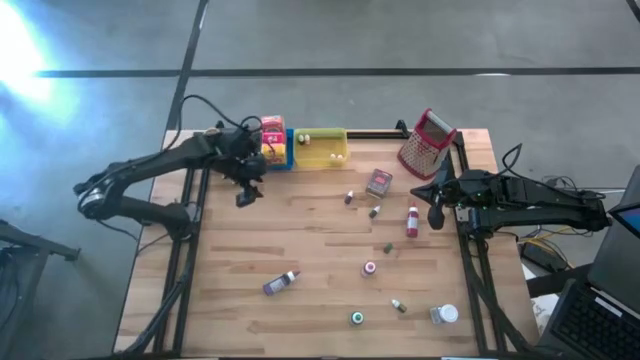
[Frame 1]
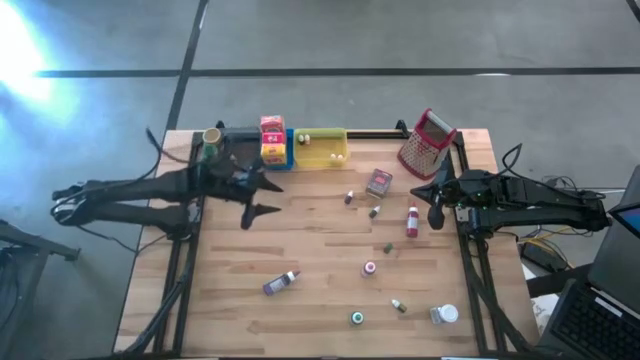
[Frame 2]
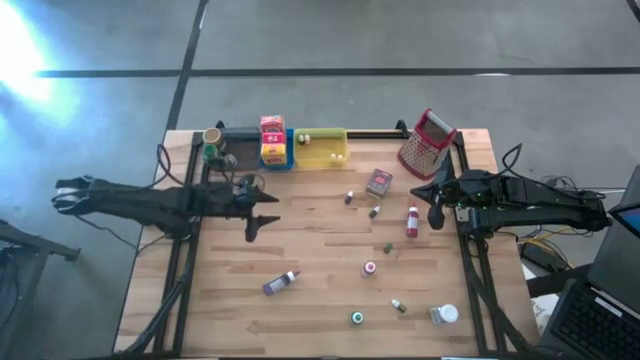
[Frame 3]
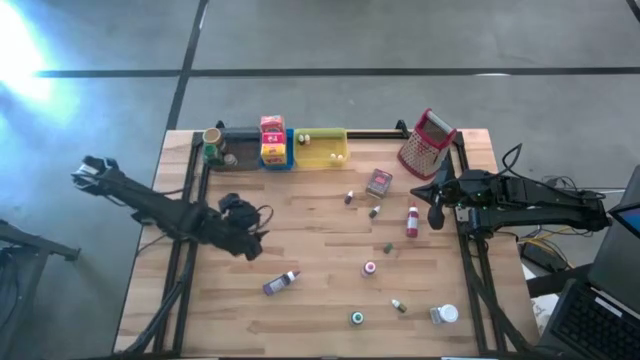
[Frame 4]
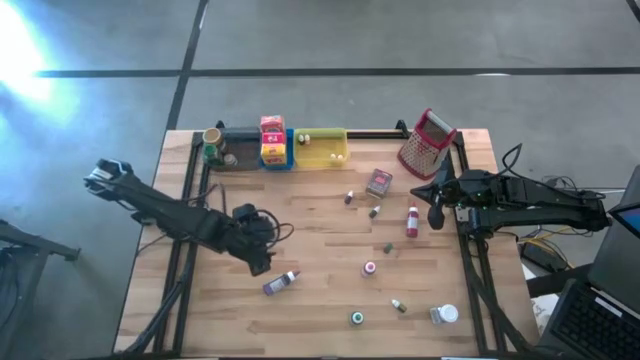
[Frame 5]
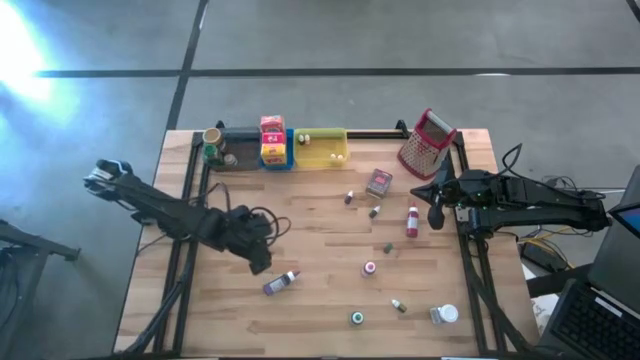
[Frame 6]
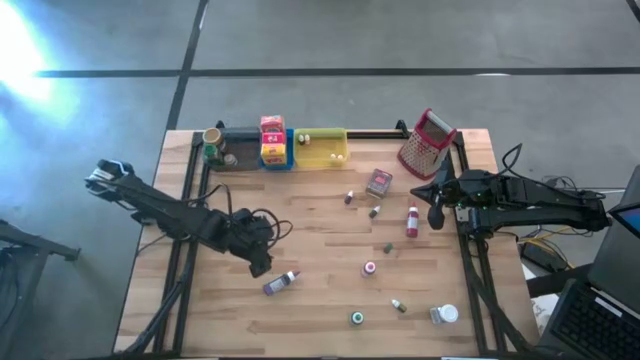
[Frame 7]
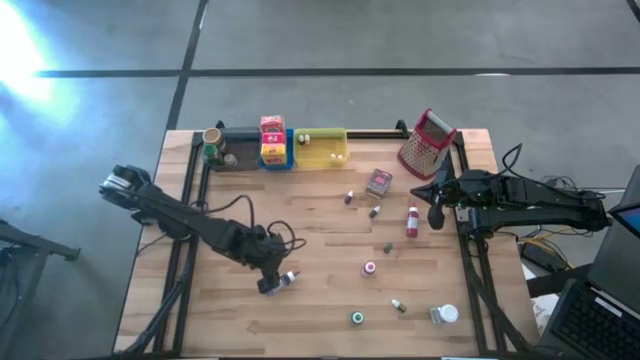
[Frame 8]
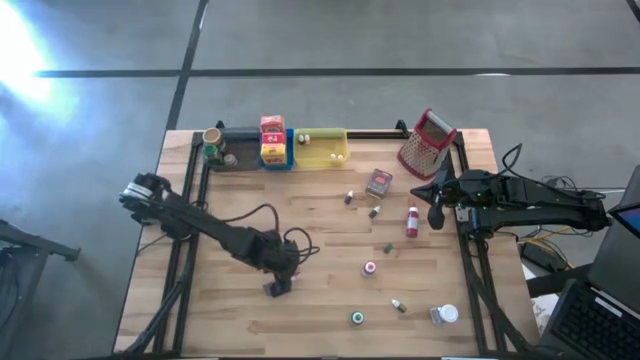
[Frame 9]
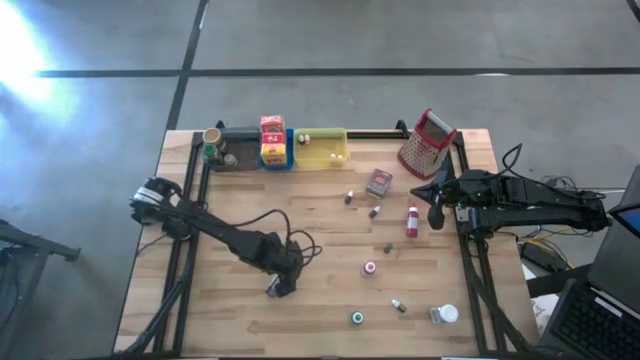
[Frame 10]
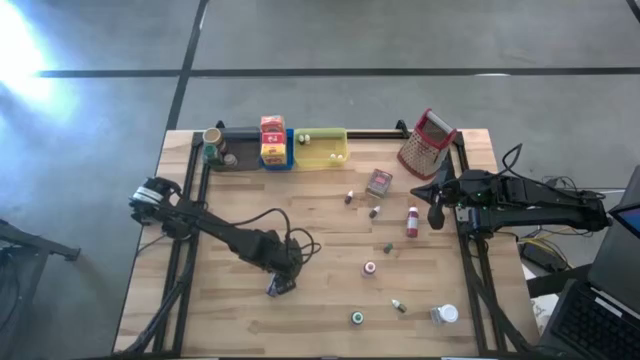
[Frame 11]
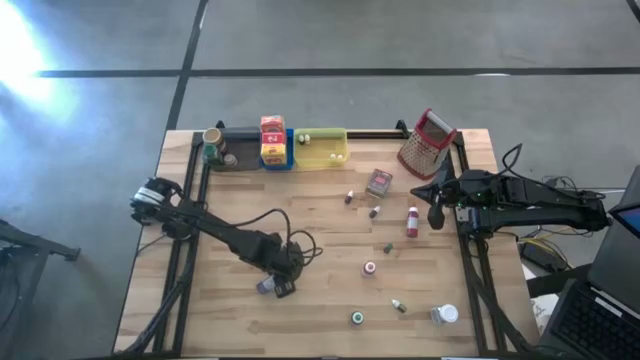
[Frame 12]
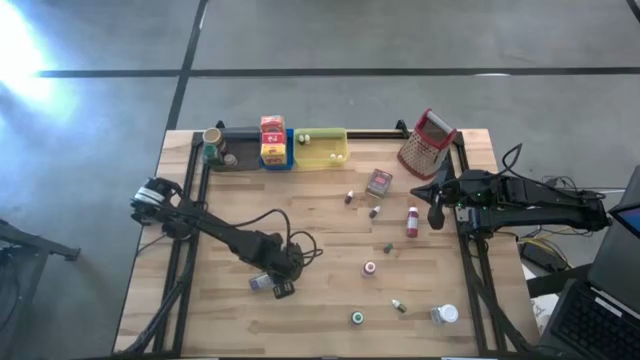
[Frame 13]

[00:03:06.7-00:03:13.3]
Task: Pick & Place Kitchen Items
Adjust the large violet food coloring bottle

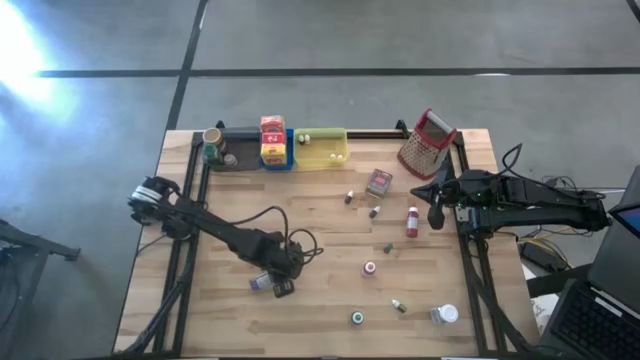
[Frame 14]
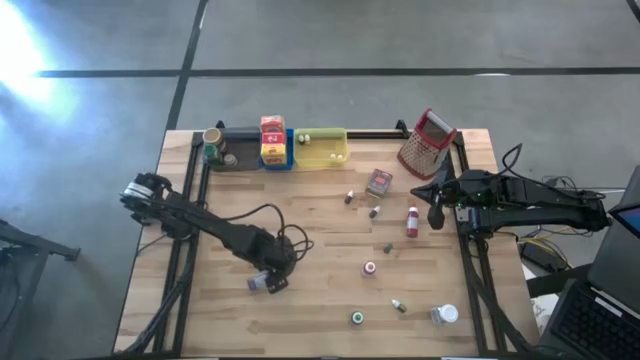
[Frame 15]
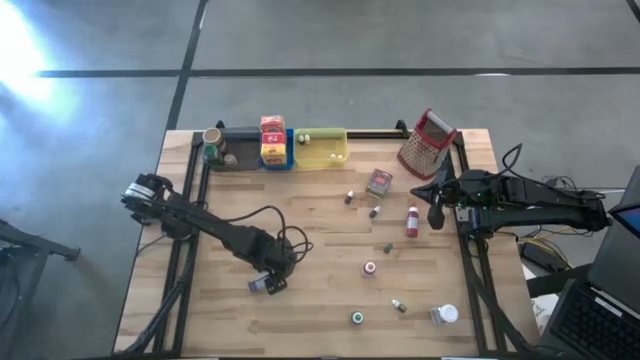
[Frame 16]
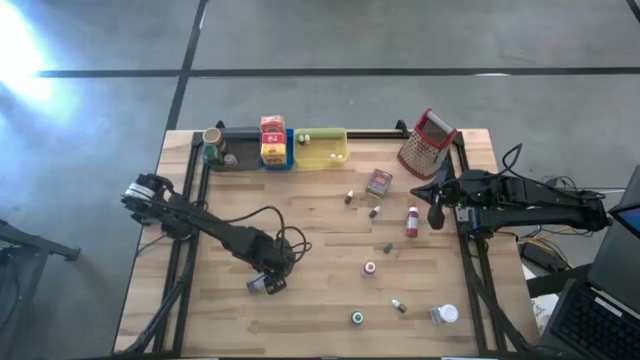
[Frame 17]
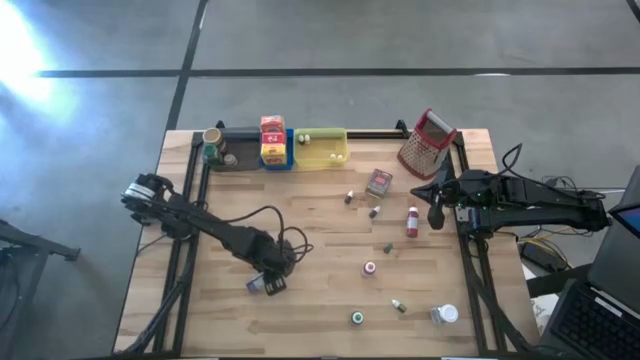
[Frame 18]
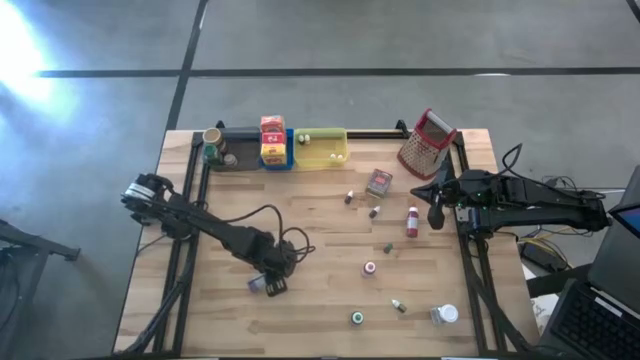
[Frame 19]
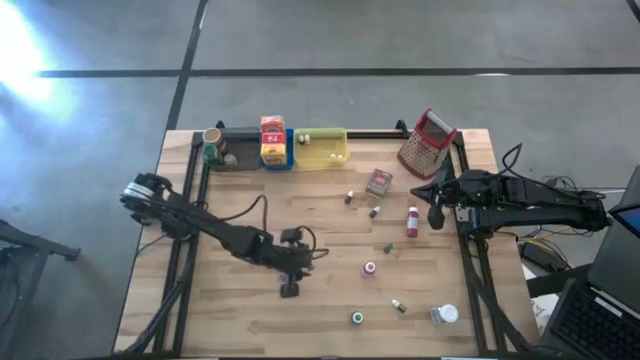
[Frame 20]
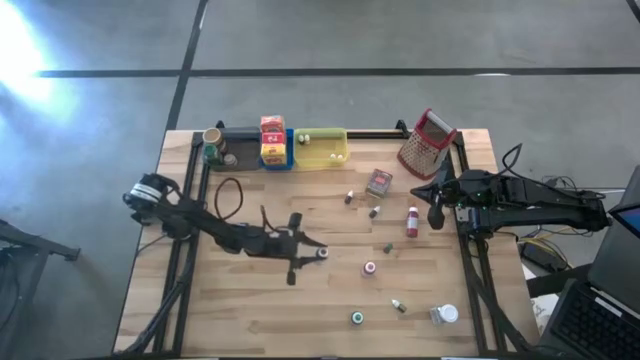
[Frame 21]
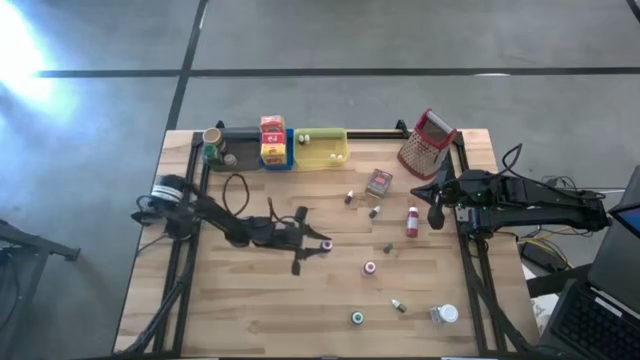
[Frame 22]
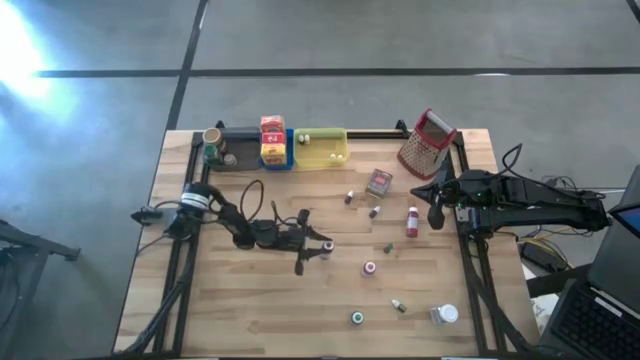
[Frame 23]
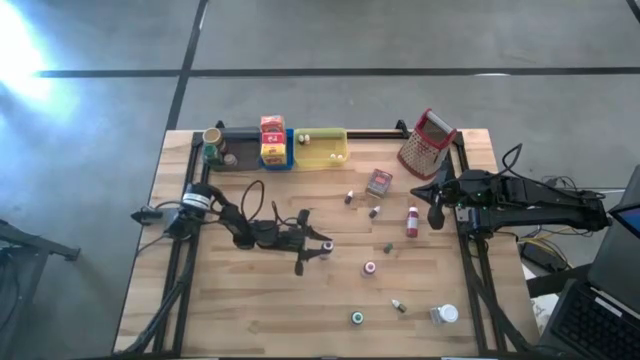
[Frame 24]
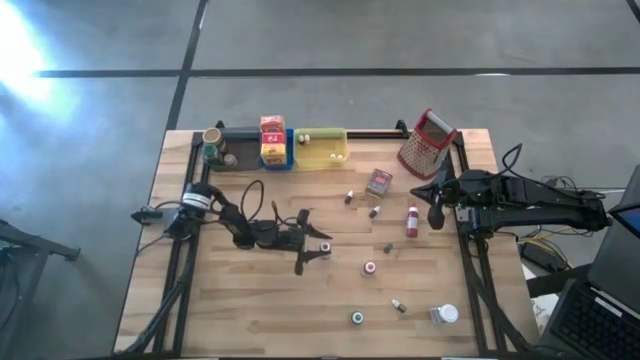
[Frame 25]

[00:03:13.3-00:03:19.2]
Adjust the large violet food coloring bottle

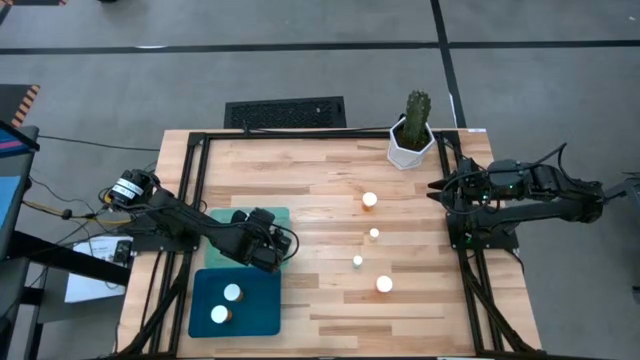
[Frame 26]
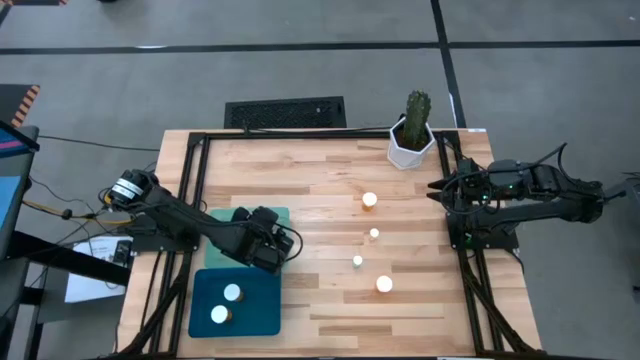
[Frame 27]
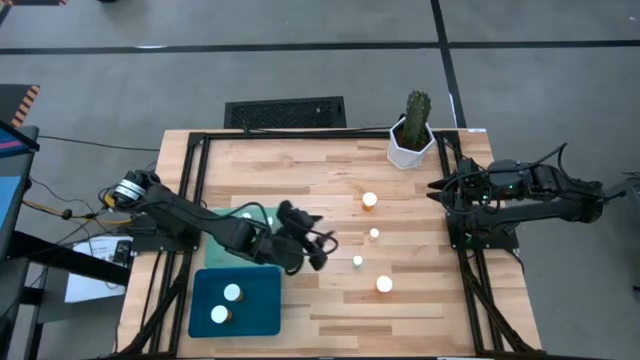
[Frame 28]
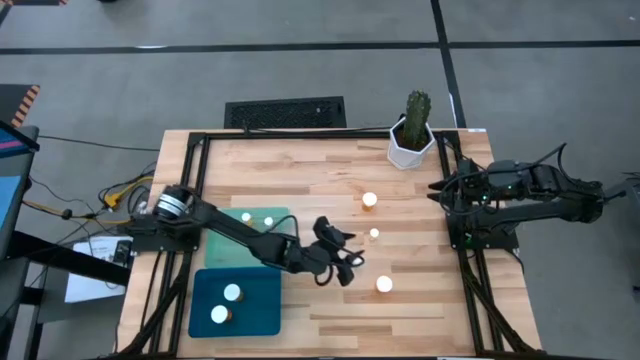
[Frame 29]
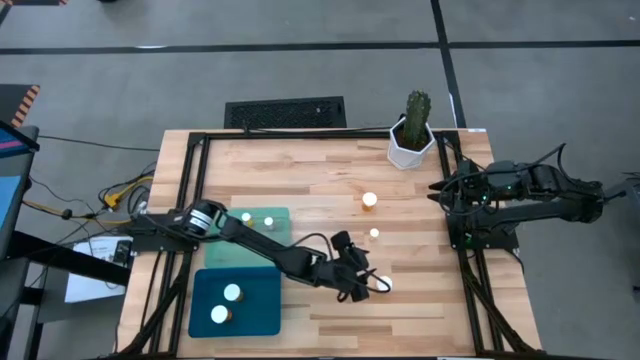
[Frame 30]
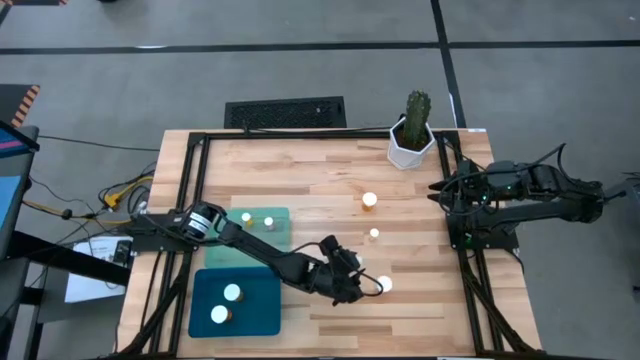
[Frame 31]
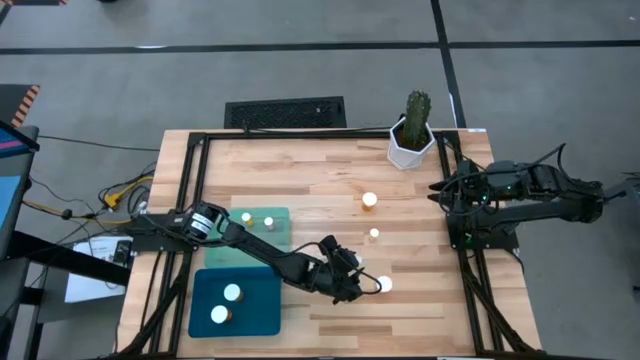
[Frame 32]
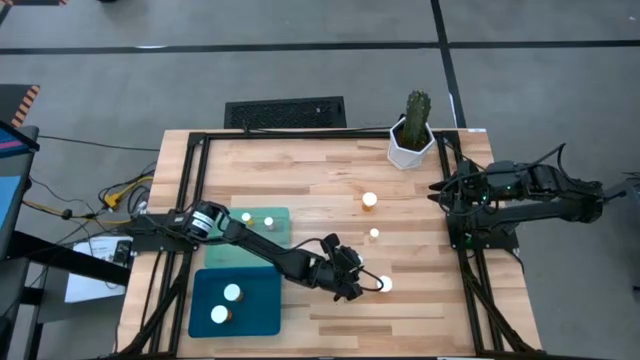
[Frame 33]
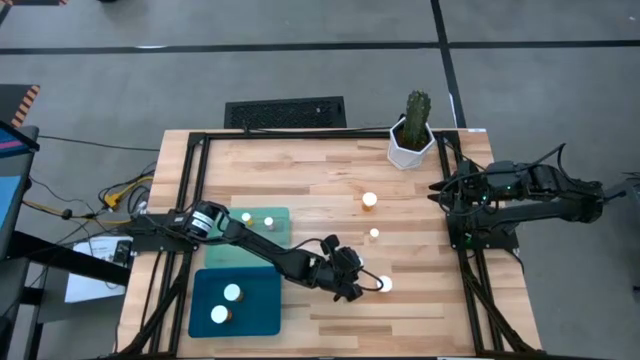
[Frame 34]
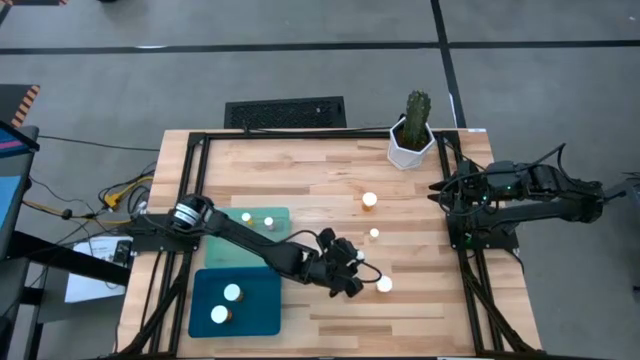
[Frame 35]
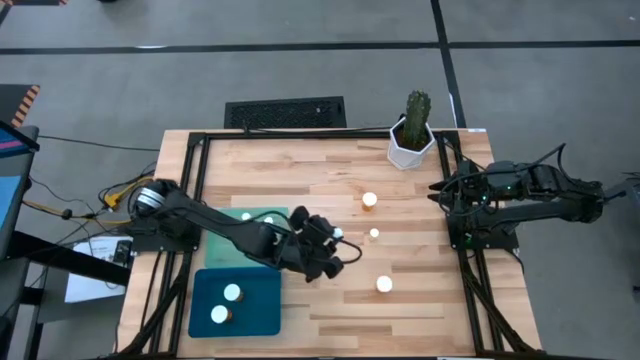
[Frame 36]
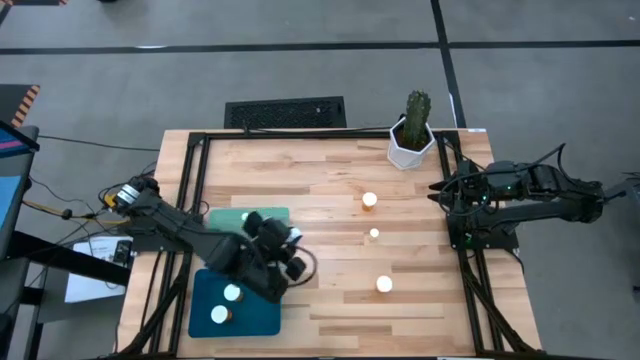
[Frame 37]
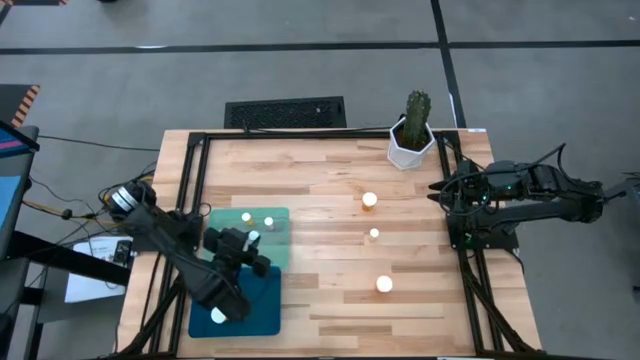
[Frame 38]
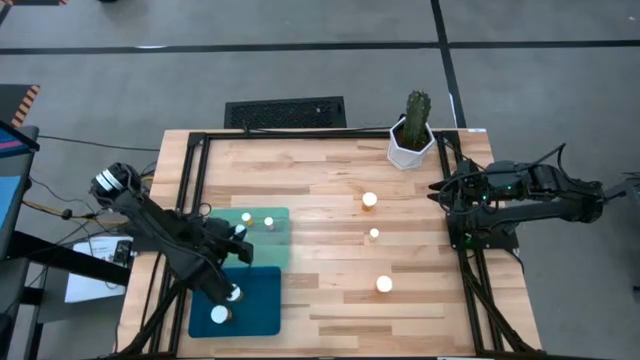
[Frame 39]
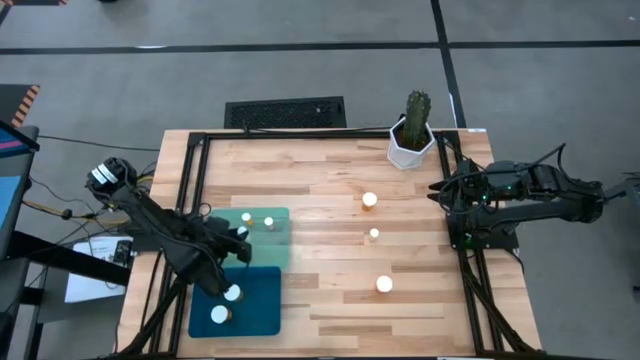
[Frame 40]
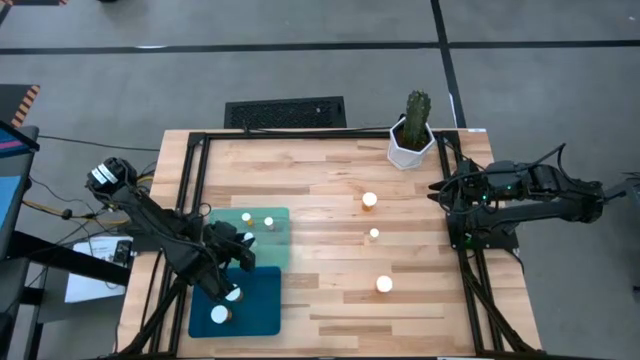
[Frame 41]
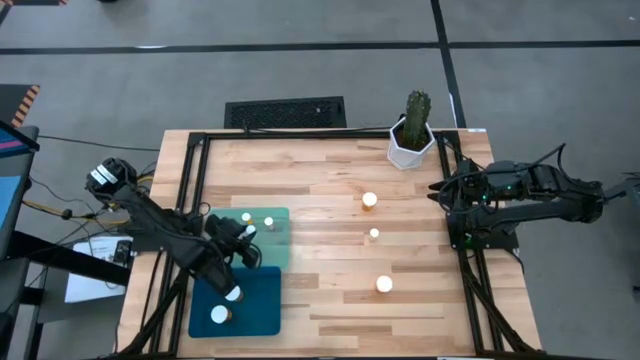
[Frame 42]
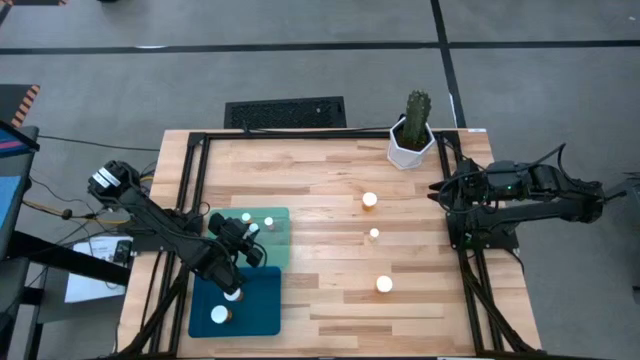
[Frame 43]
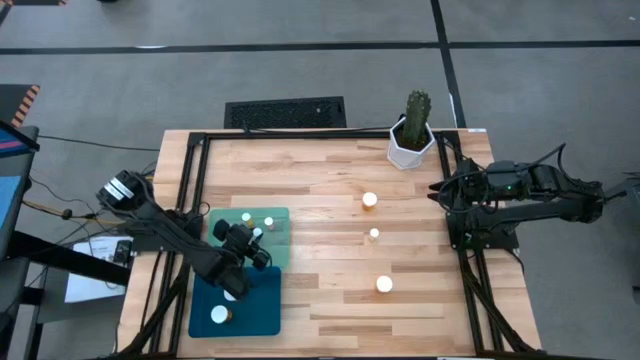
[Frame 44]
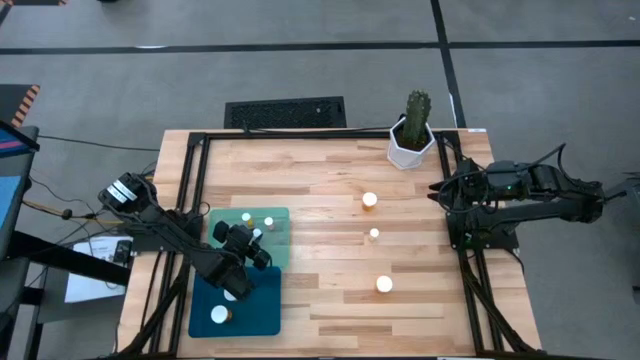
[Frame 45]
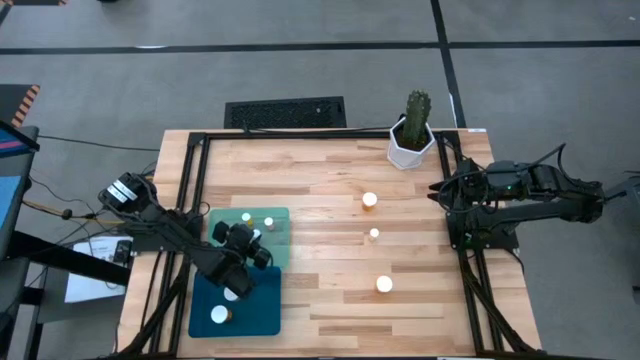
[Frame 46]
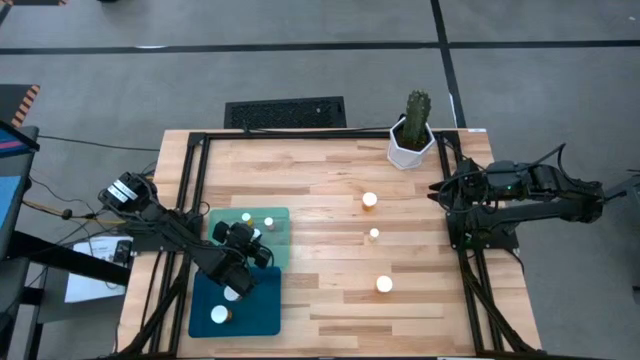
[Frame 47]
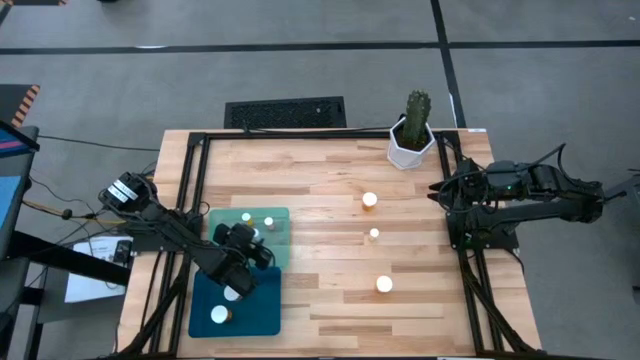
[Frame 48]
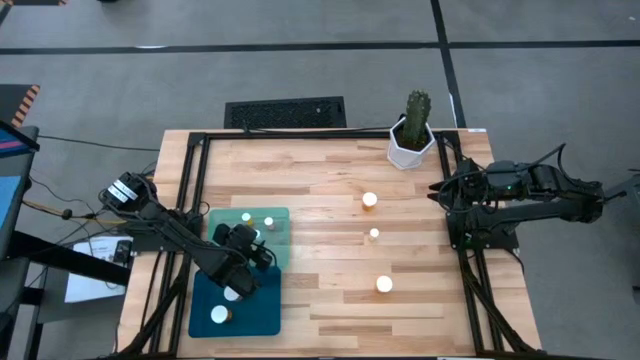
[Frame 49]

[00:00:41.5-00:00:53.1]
Task: Pick and place medicine bottles into bin by pill shape (circle, oval)
Put the small green pill bottle into the green bin
